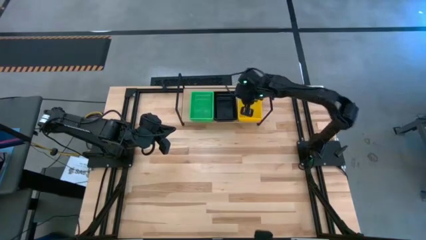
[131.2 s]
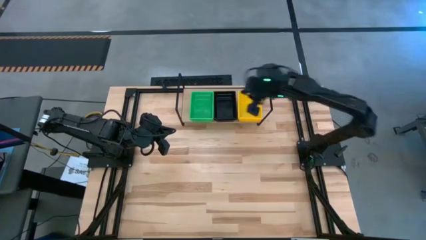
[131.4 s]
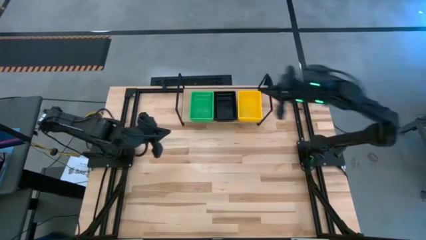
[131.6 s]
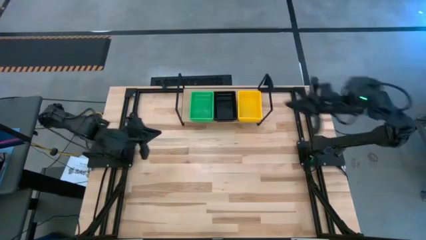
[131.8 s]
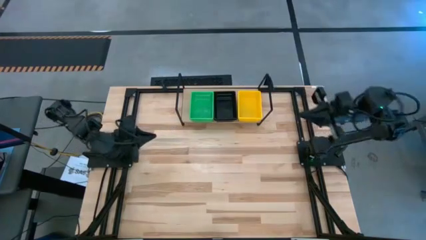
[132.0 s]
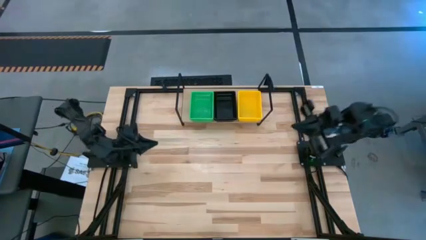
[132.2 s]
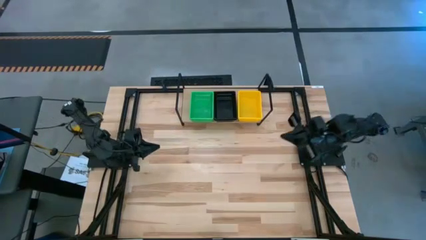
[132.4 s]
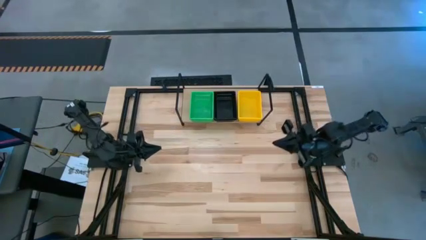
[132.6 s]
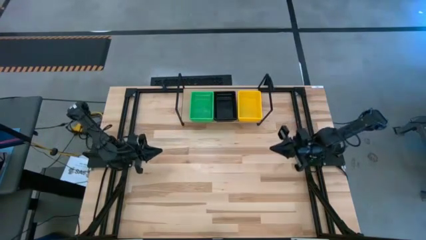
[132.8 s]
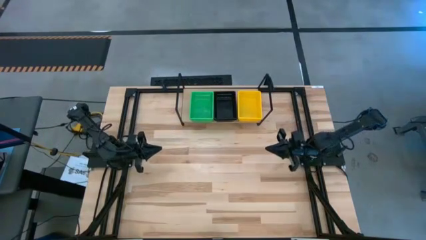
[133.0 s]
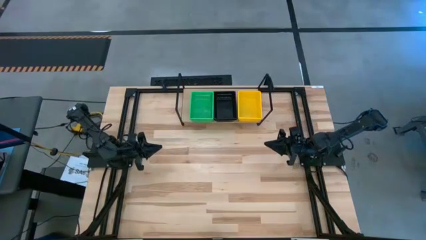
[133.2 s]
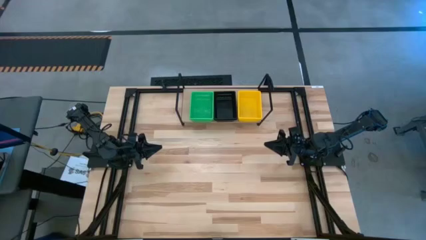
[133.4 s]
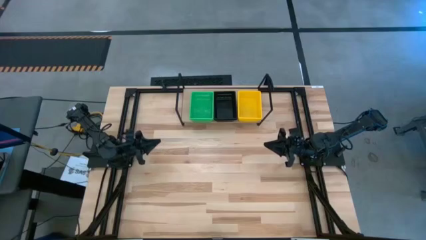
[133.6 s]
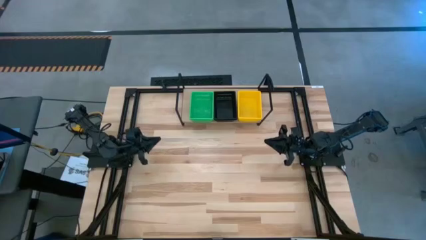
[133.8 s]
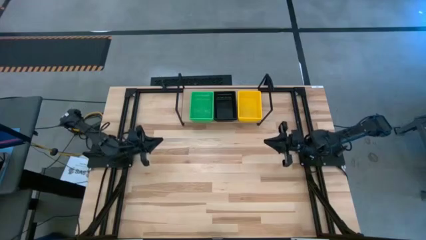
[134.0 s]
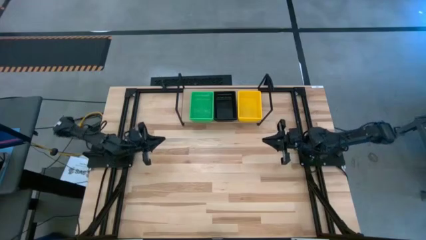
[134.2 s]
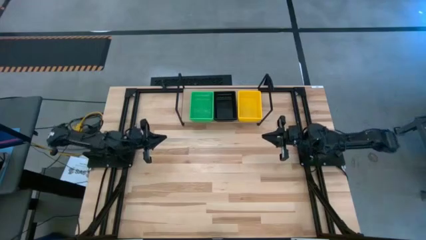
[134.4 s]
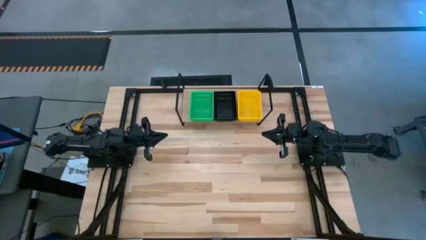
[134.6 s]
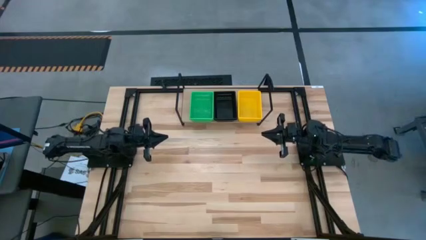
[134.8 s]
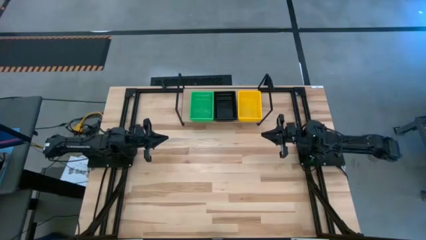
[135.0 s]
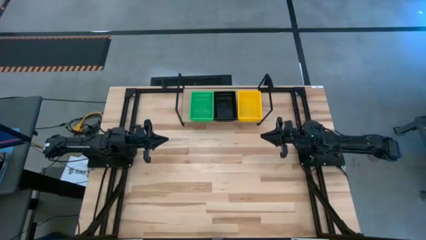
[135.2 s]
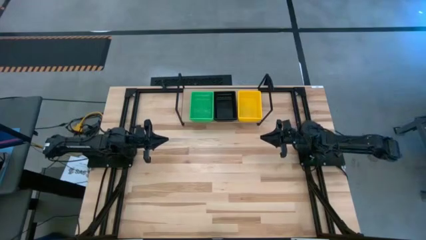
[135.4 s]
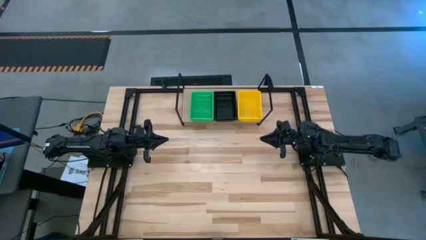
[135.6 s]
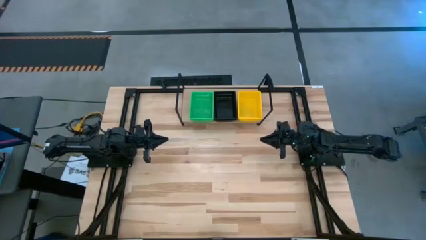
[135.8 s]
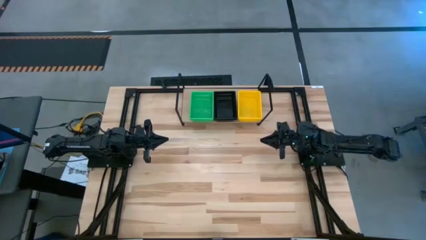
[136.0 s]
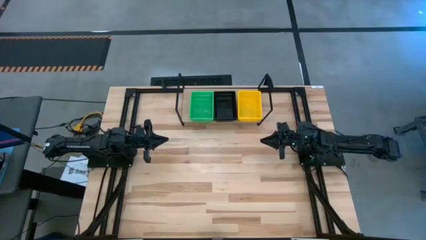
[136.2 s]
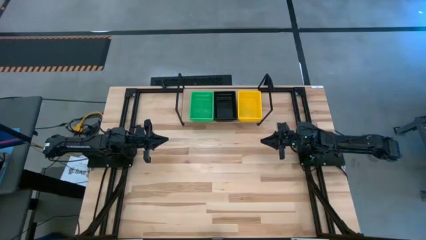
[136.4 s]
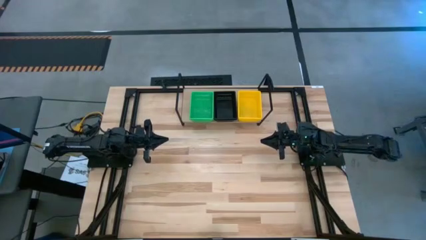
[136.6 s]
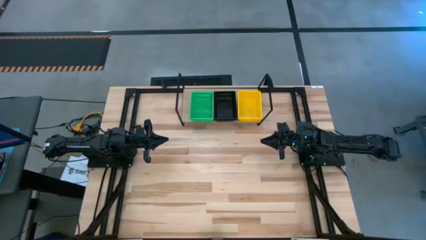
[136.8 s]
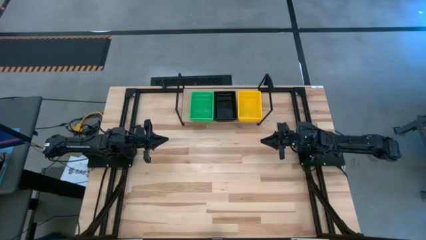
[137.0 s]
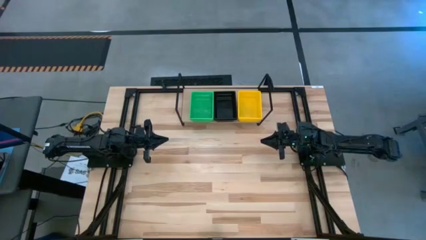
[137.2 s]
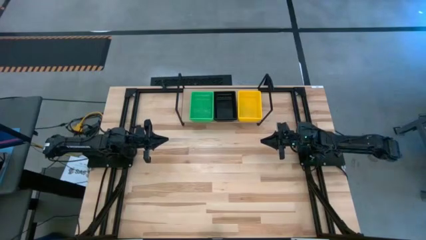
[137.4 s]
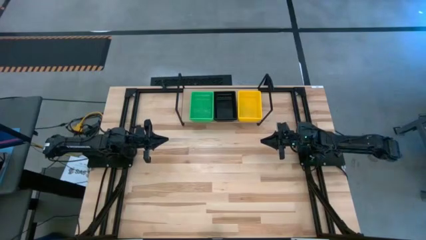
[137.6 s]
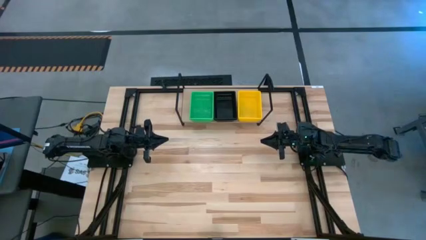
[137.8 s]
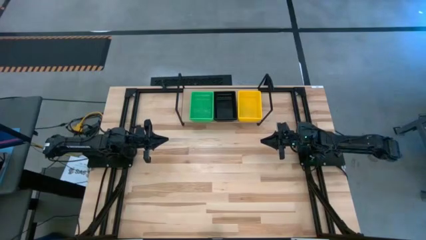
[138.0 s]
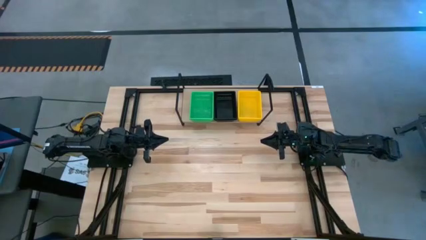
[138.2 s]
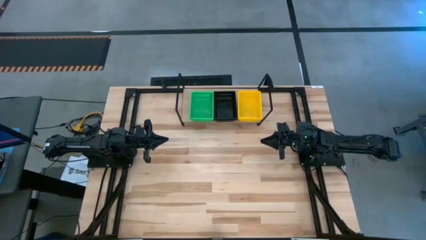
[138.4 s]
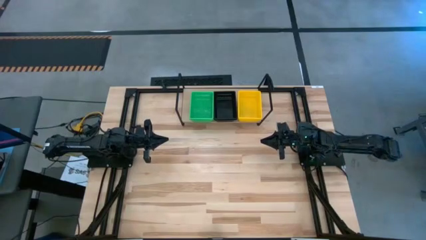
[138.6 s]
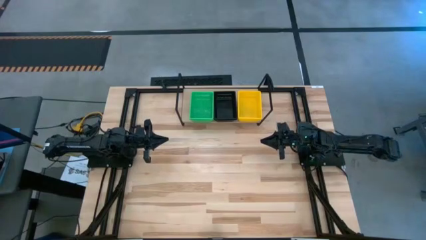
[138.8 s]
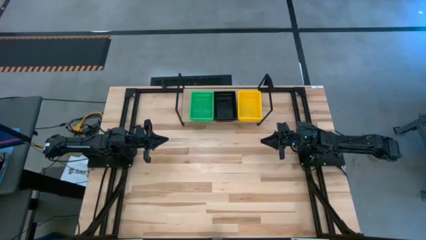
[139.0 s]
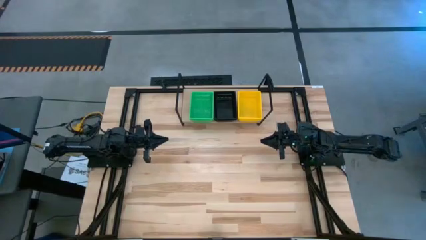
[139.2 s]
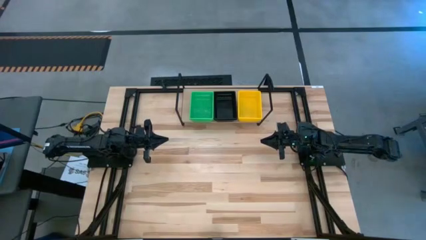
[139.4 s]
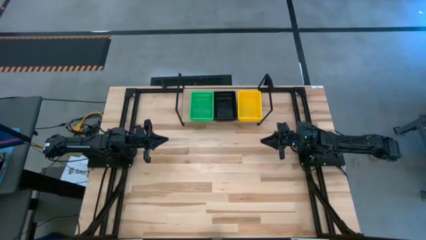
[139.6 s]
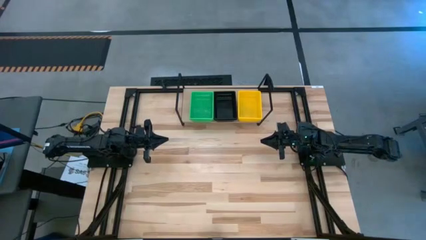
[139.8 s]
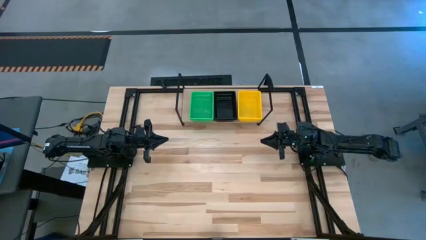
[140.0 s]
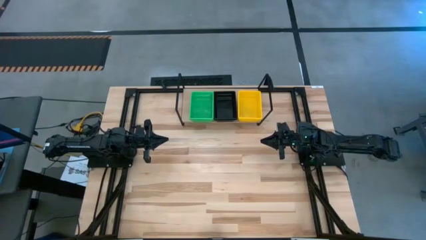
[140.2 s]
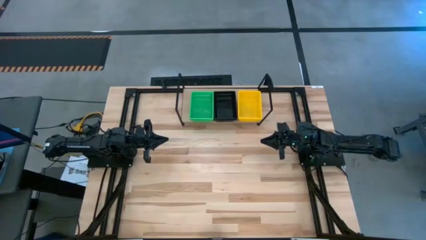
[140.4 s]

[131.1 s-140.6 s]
Task: Stack baskets on shelf by color
Return to Home Position

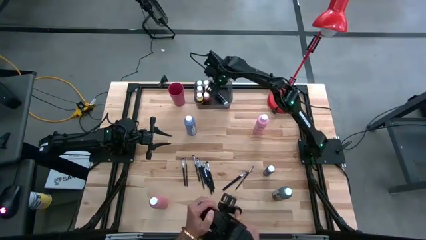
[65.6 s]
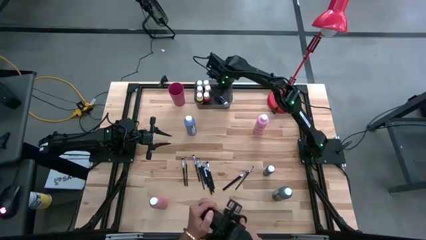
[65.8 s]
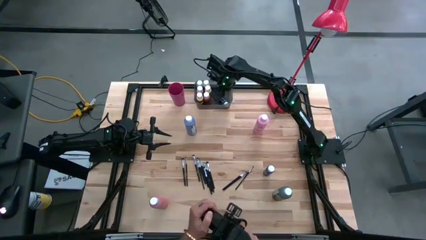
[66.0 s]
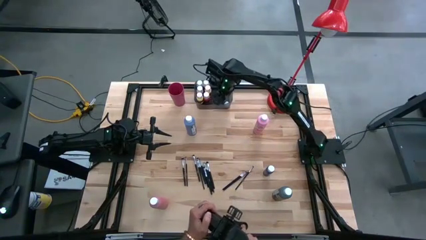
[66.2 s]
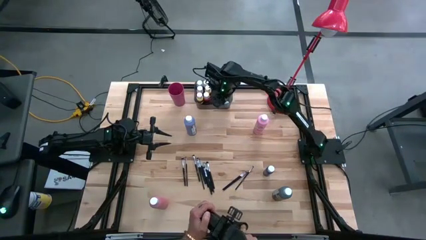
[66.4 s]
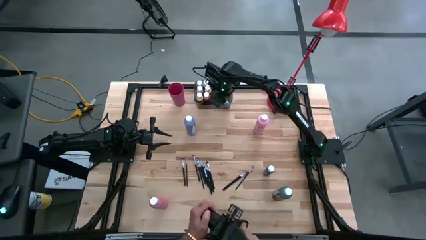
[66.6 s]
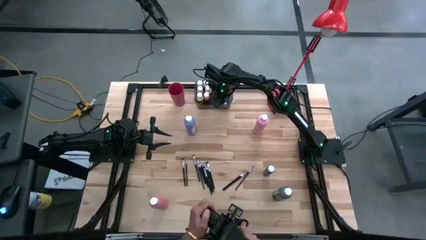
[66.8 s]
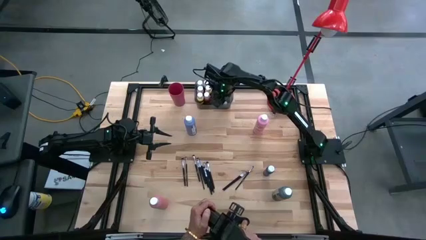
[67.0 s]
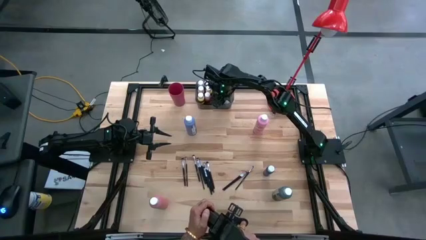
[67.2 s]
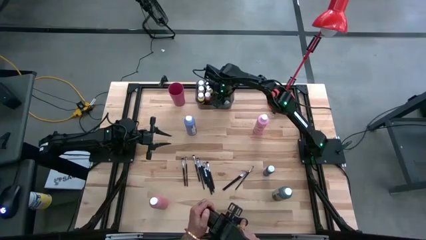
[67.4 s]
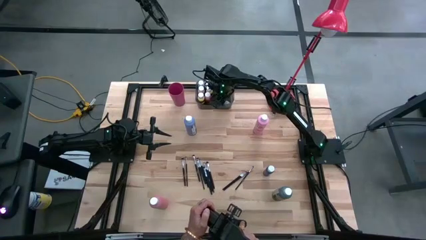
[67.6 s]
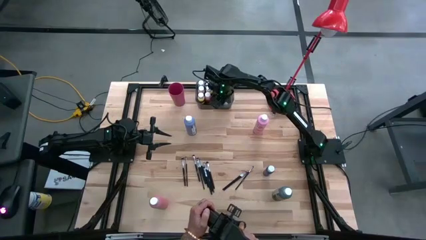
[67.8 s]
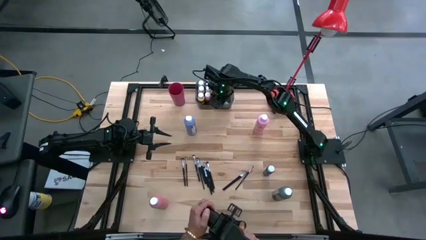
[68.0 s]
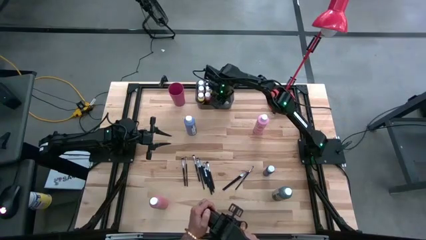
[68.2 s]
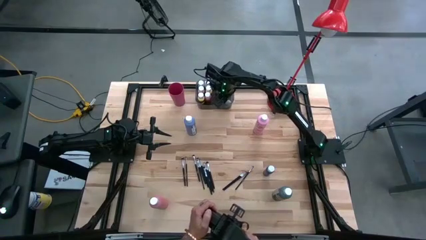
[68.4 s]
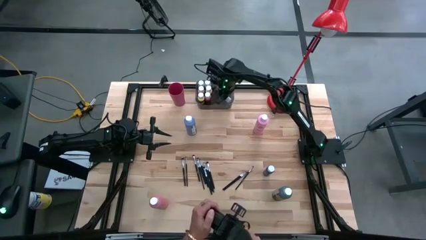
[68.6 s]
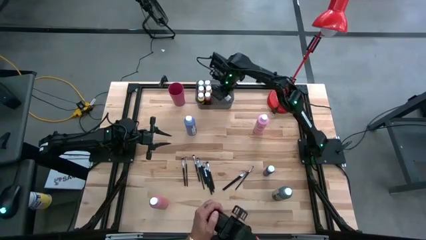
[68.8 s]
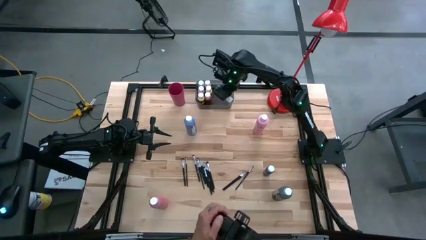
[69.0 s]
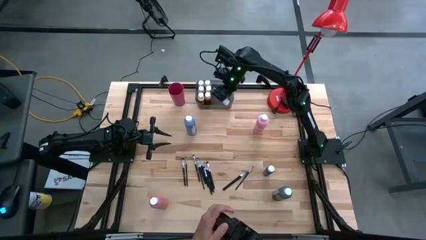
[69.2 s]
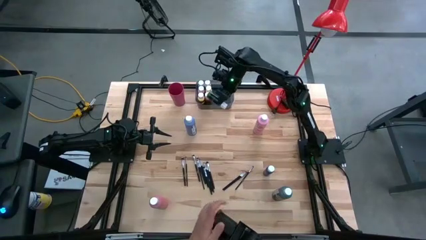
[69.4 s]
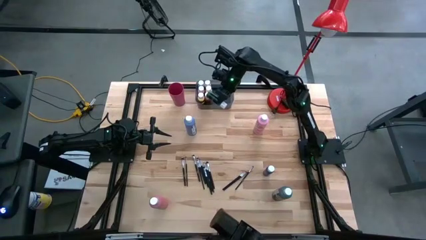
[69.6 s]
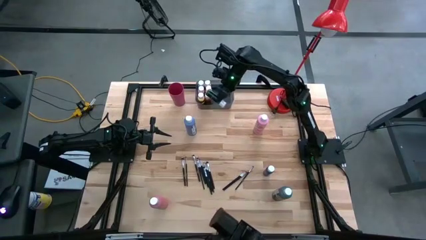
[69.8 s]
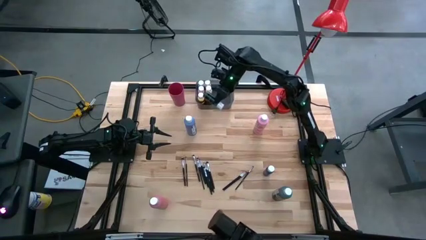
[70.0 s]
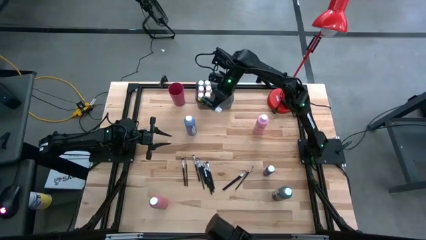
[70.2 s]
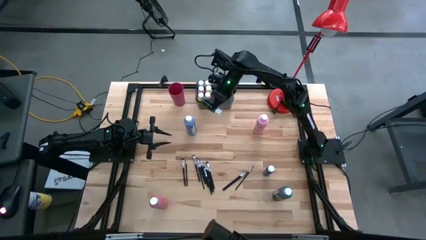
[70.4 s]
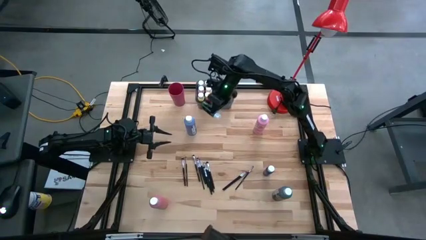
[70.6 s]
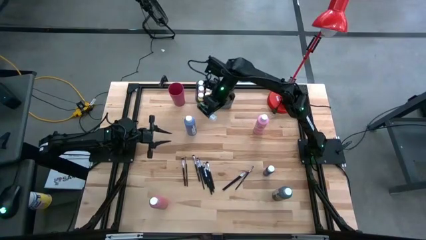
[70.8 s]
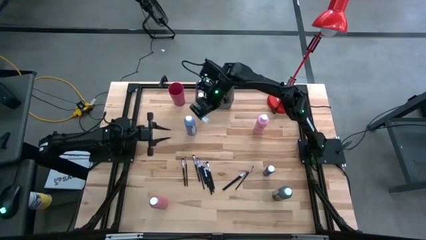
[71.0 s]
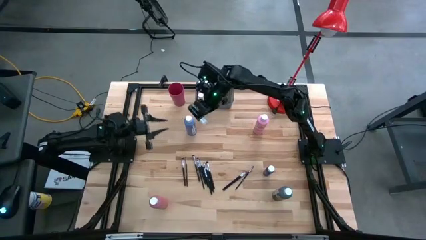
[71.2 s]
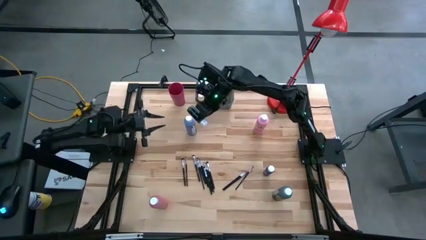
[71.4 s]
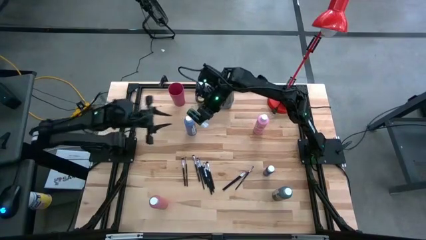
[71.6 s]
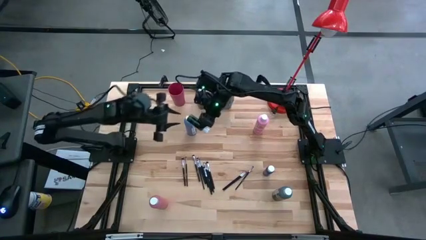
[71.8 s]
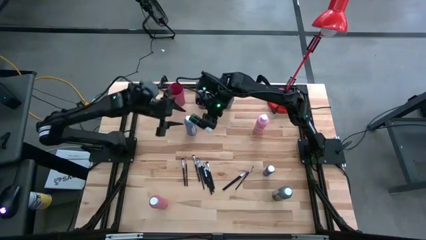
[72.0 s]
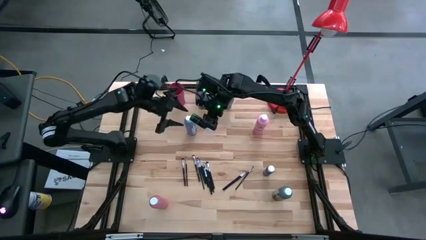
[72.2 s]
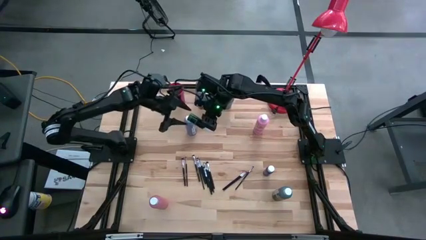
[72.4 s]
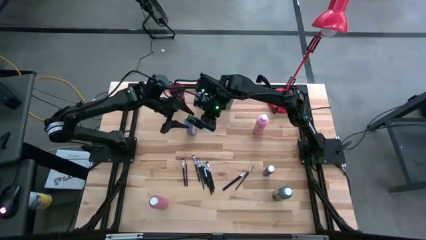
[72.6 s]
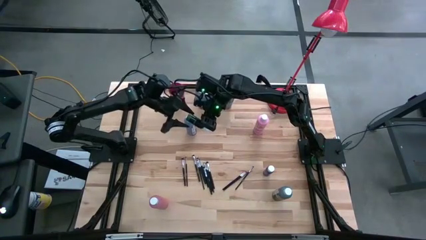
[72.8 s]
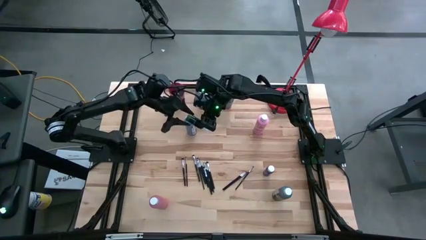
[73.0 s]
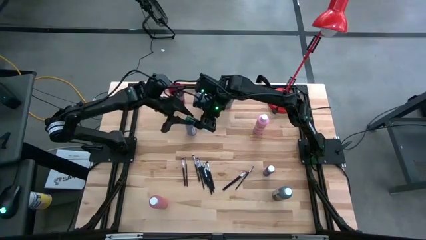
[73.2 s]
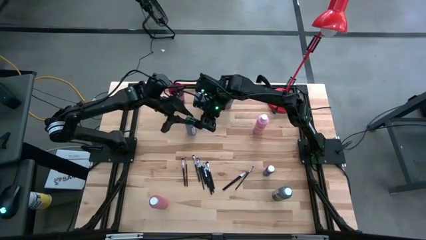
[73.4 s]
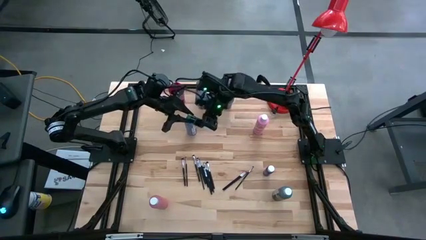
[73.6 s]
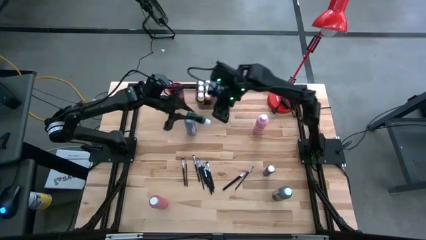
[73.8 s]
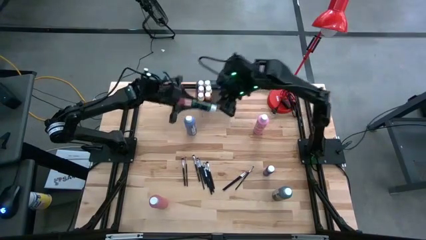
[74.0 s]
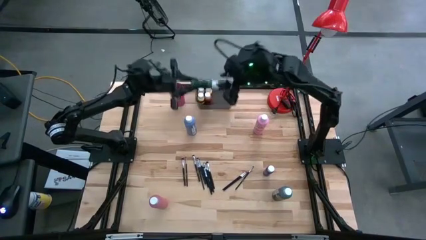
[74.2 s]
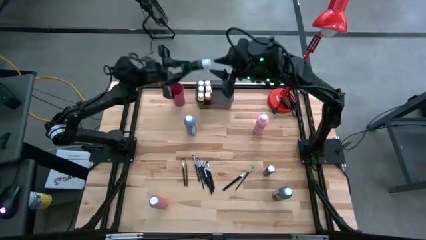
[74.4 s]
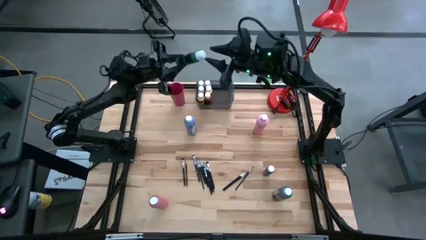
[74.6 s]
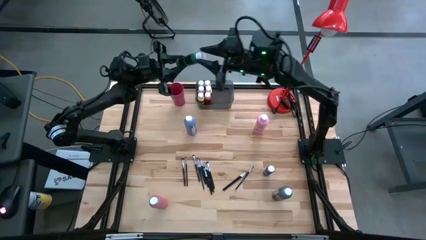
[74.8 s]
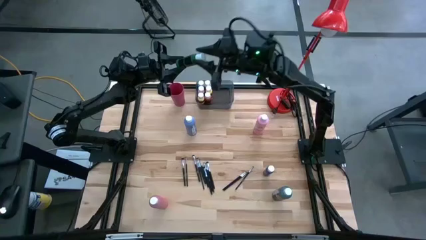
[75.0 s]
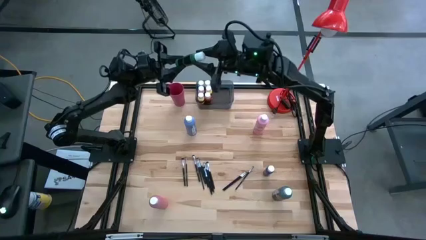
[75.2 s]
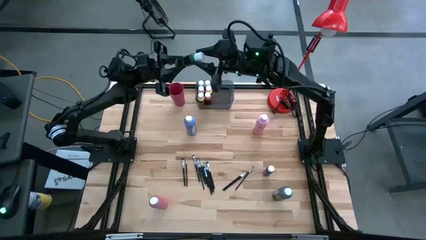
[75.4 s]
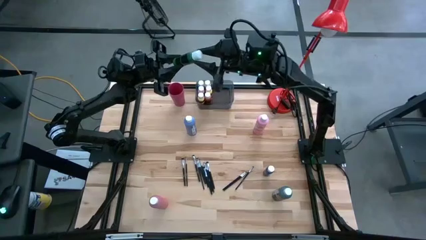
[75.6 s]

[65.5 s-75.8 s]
Task: Pick & Place Paint Supplies
Put the green paint bottle into the black bin
